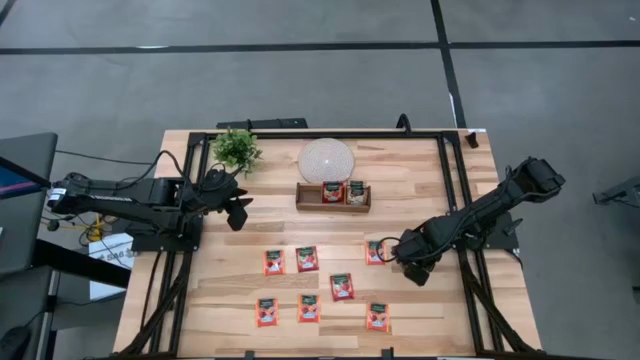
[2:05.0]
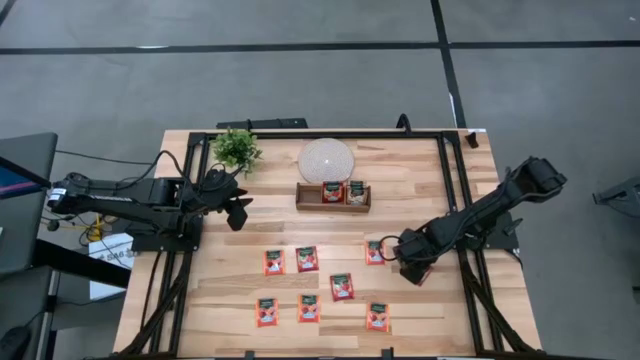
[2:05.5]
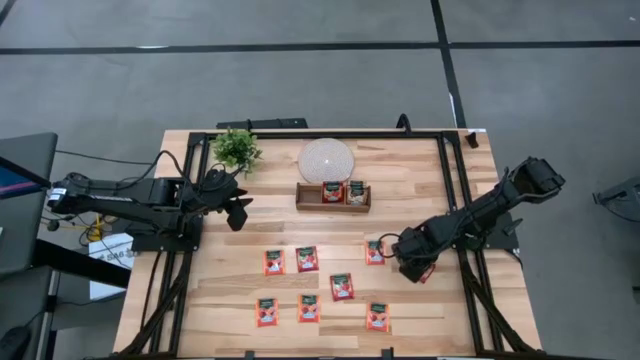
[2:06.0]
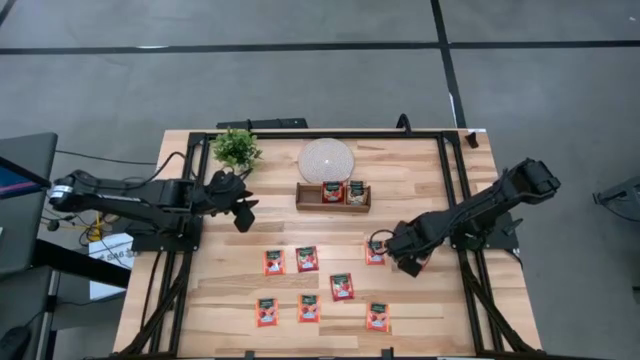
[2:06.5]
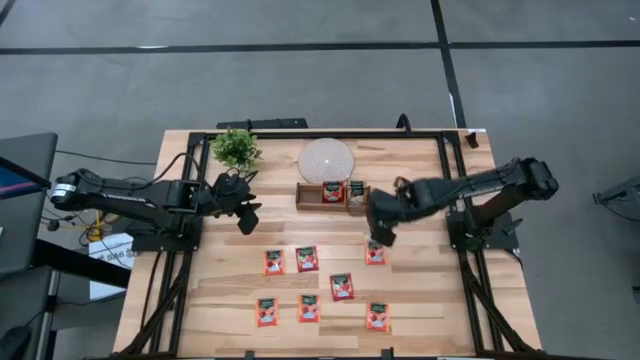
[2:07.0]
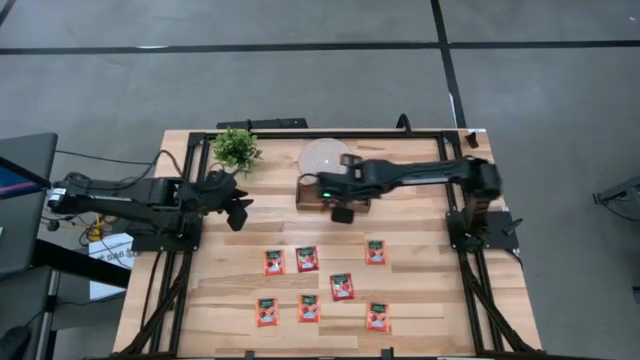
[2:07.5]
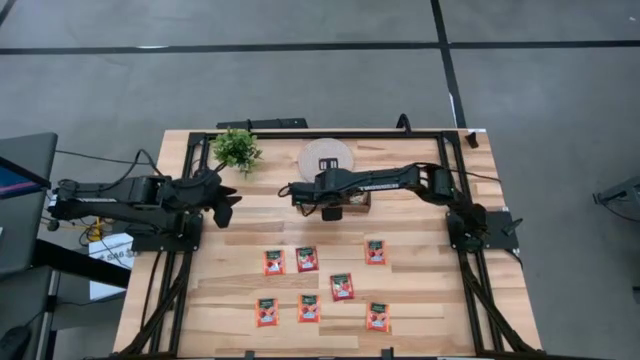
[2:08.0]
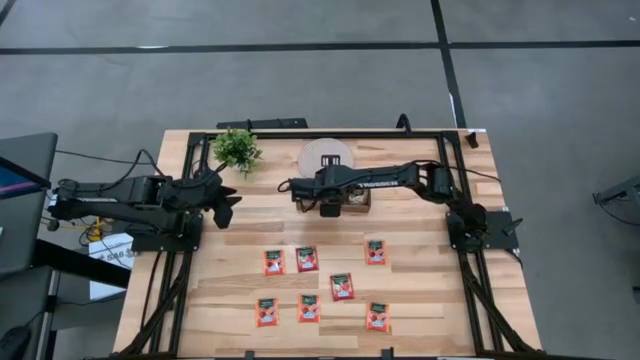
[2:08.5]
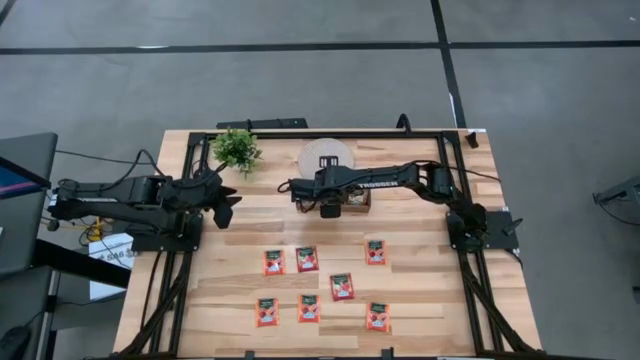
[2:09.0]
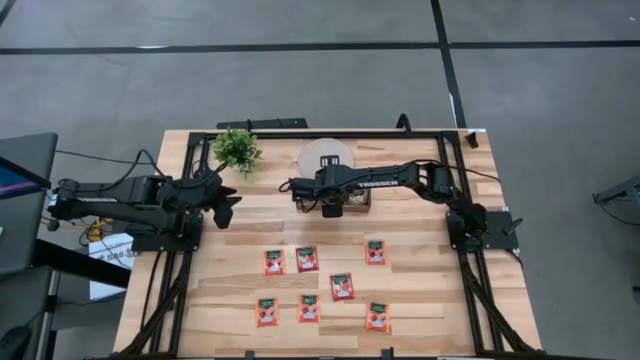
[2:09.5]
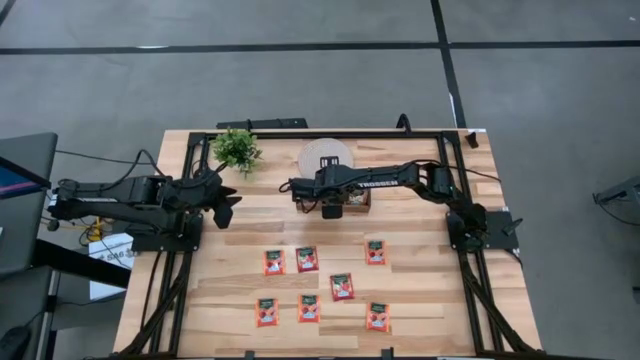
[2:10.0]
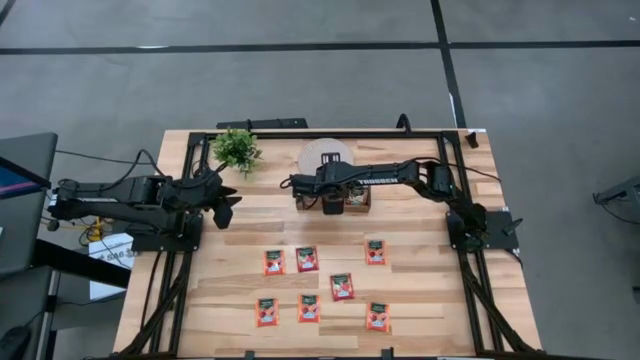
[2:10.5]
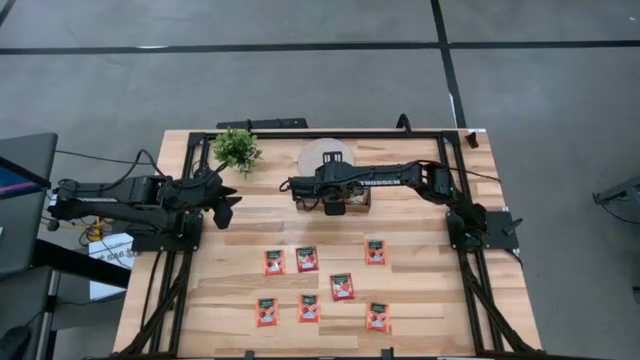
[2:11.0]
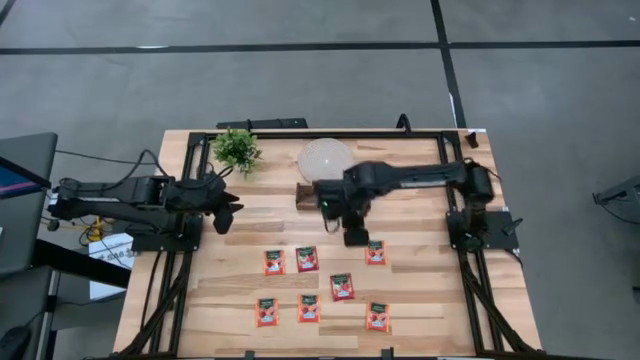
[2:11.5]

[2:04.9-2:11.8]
Task: Pick & Place Tea
Put the red tea bag into the middle section of the wooden organizer

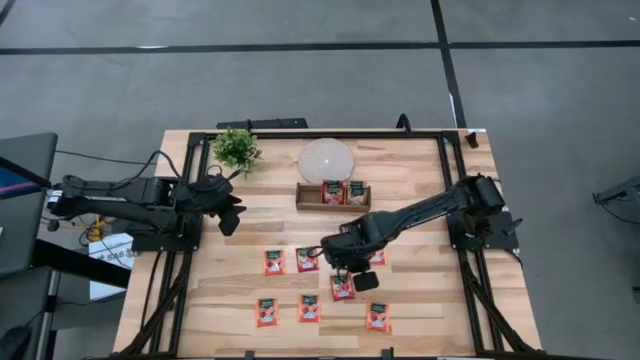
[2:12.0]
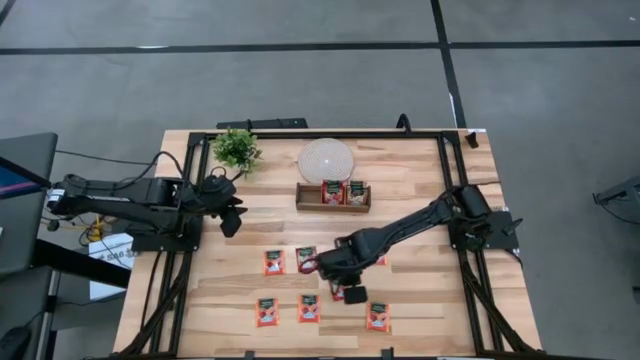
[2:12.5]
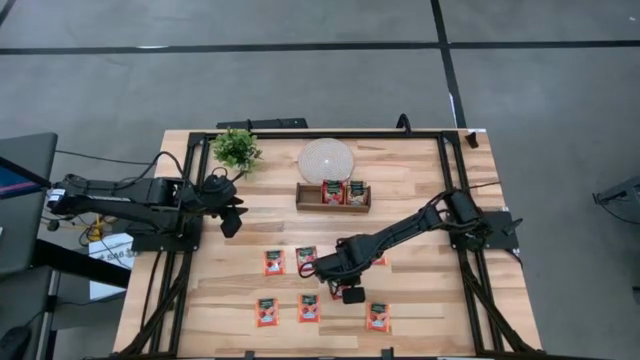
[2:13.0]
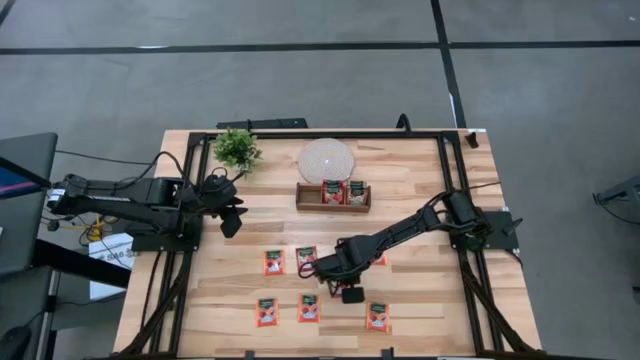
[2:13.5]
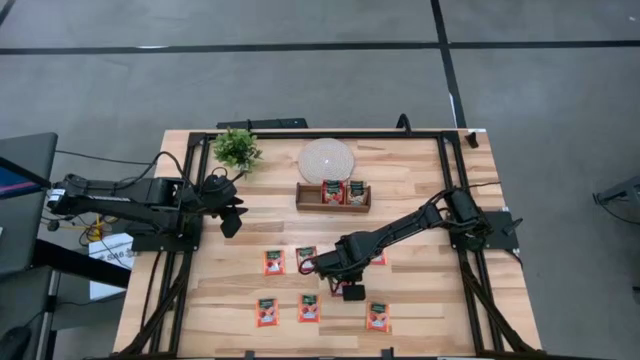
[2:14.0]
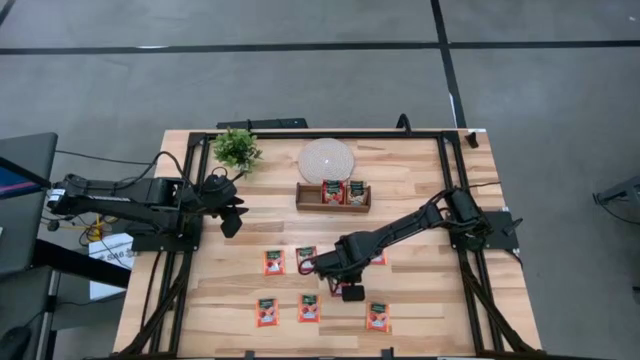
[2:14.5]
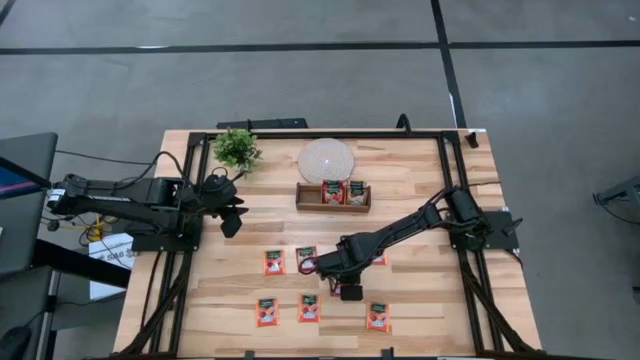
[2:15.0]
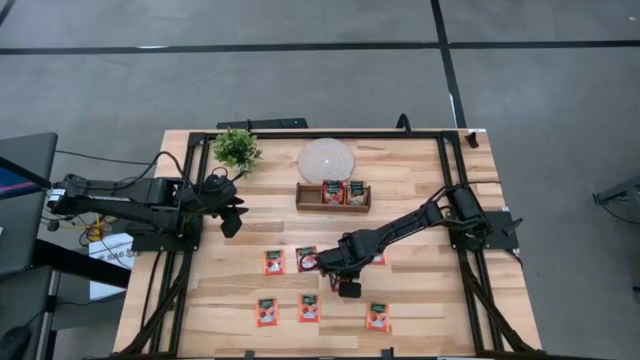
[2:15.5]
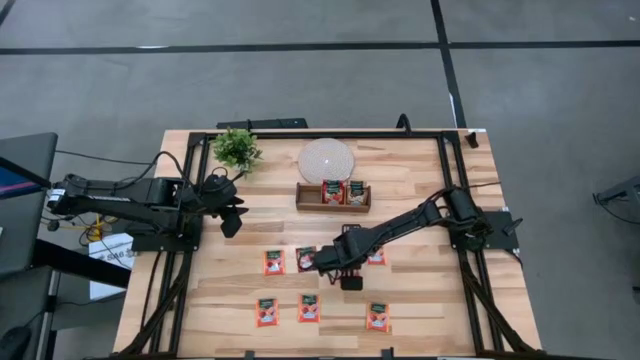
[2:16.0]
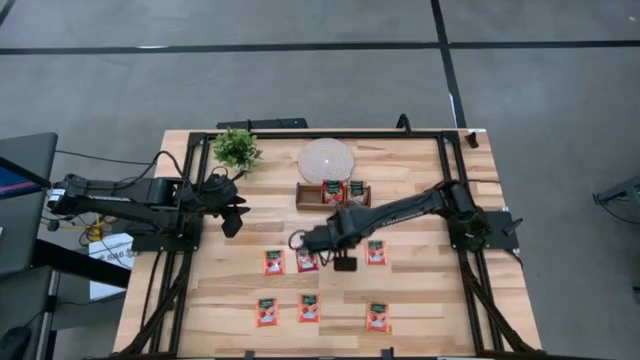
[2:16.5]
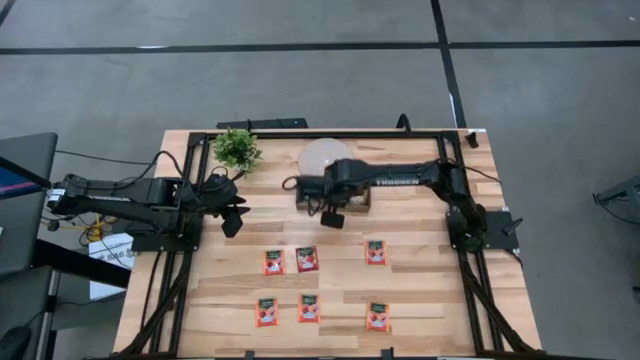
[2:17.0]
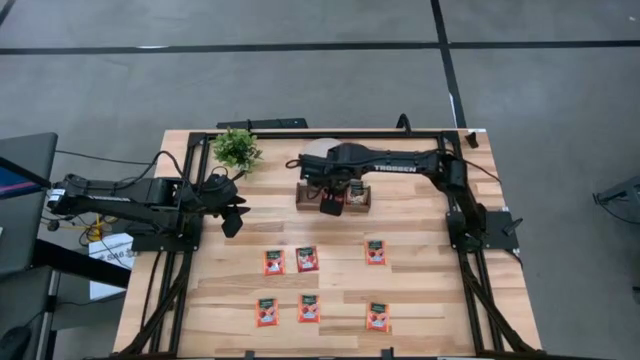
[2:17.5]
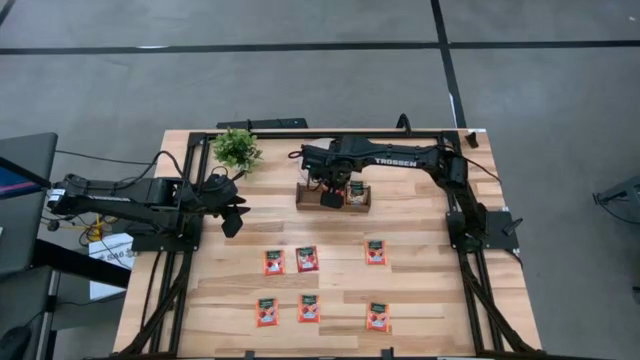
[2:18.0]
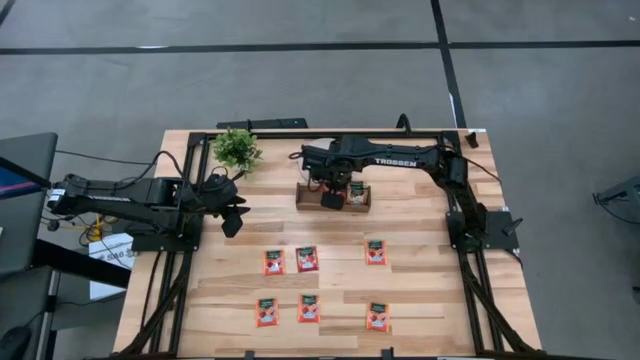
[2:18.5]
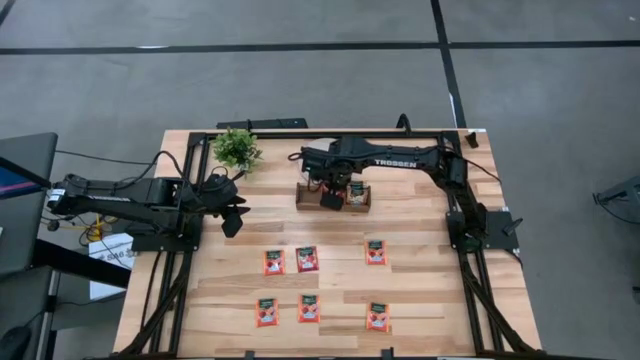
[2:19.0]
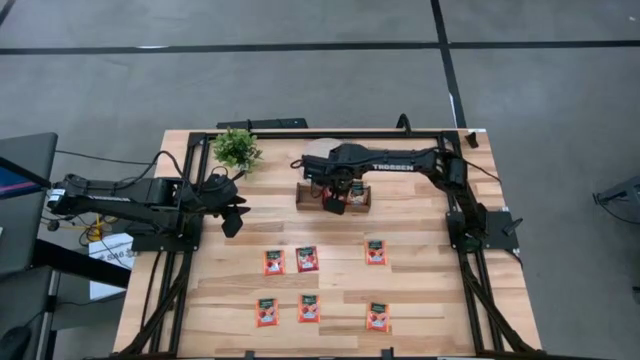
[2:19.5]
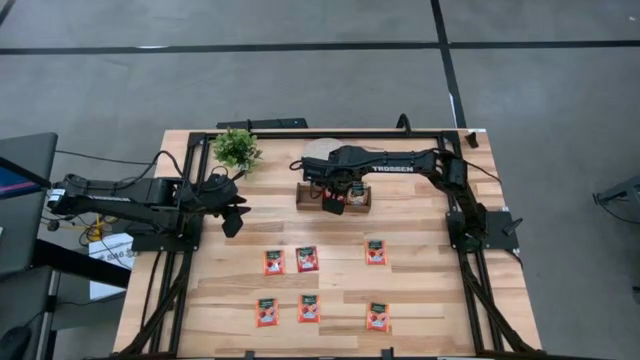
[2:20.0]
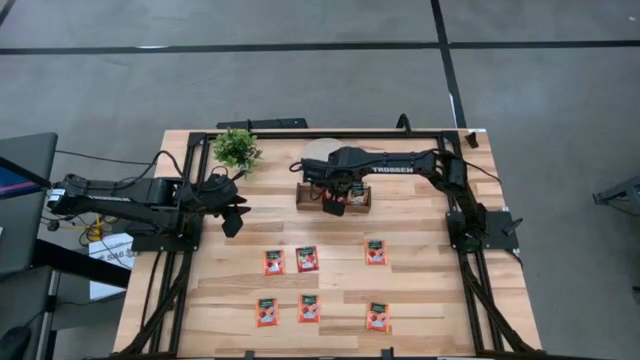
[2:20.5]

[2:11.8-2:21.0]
Put the red tea bag into the middle section of the wooden organizer

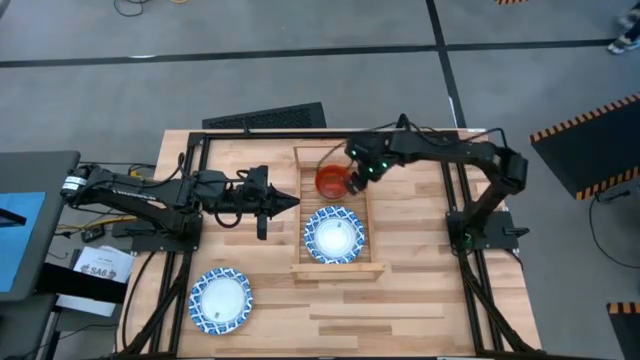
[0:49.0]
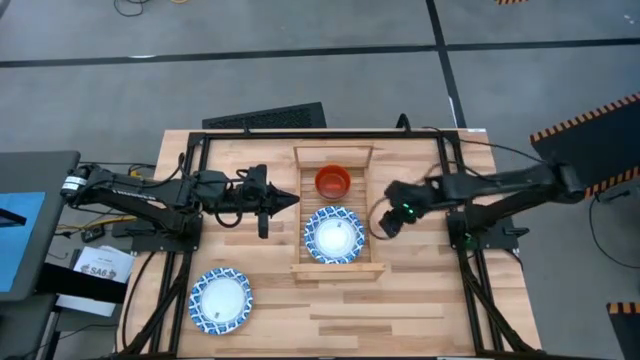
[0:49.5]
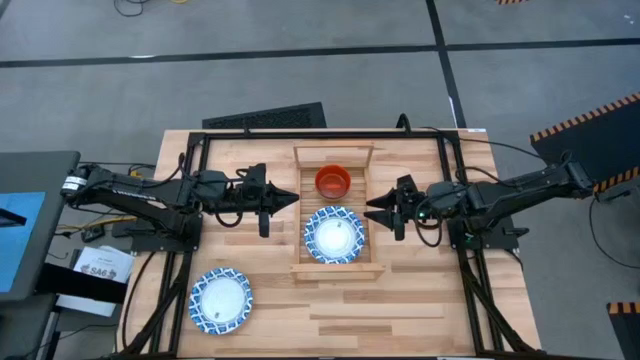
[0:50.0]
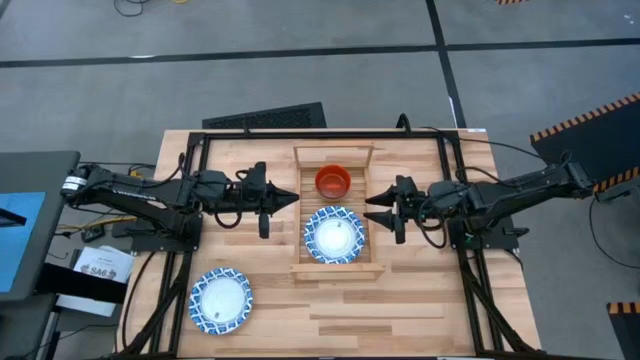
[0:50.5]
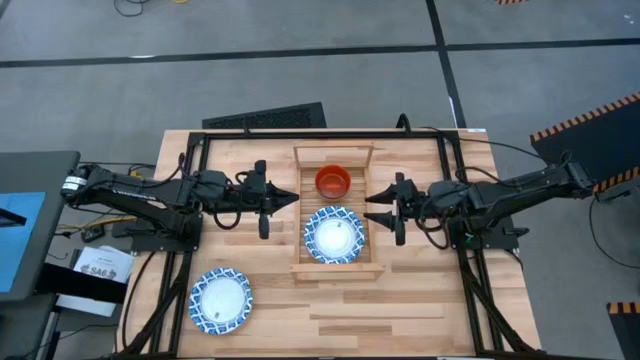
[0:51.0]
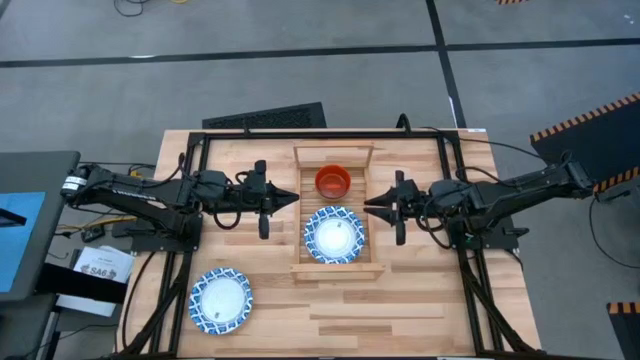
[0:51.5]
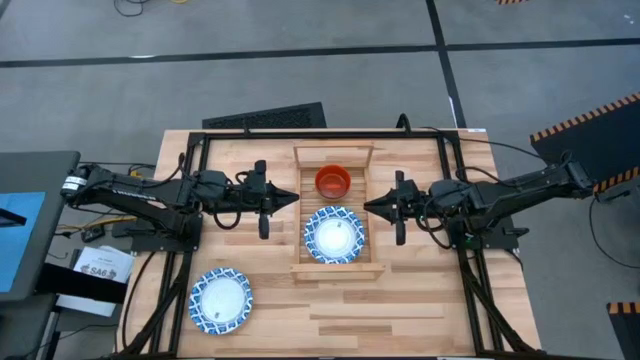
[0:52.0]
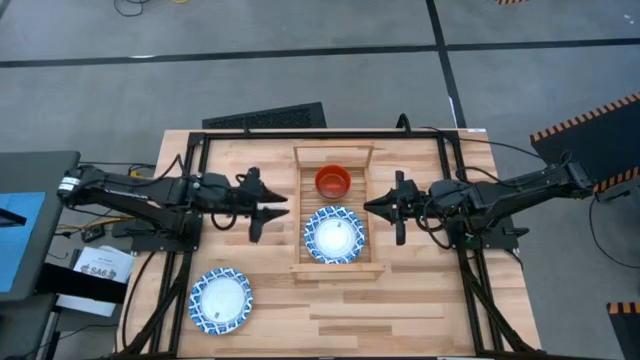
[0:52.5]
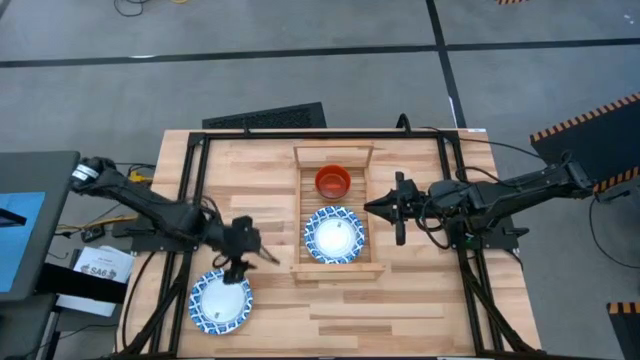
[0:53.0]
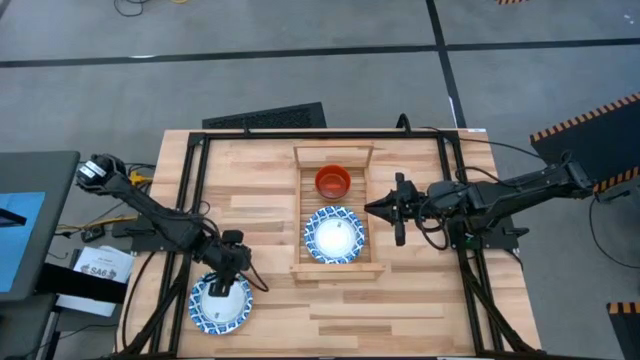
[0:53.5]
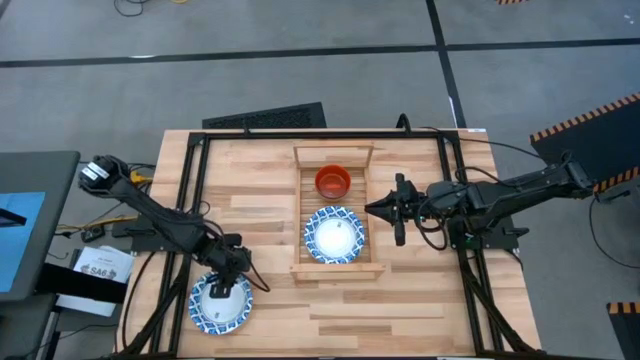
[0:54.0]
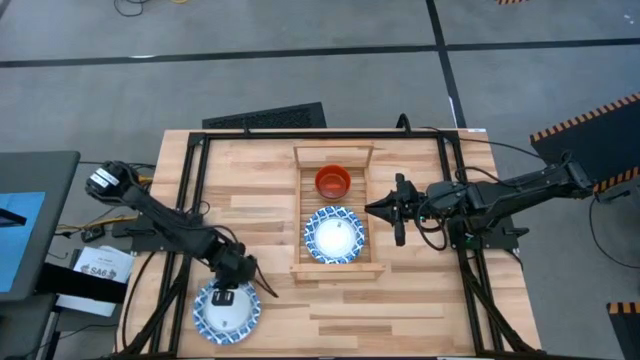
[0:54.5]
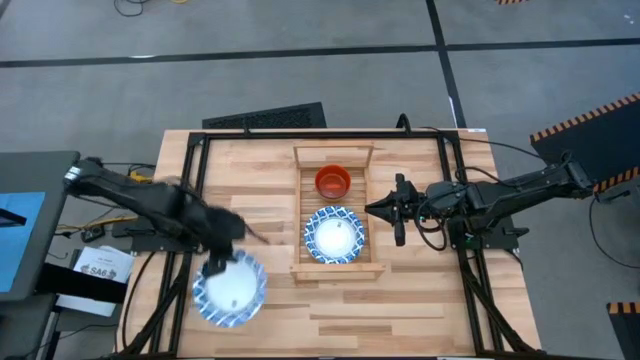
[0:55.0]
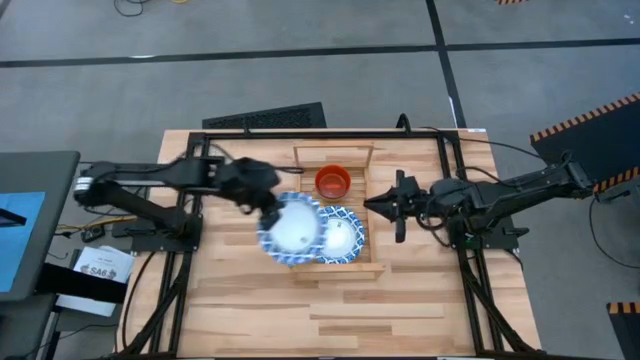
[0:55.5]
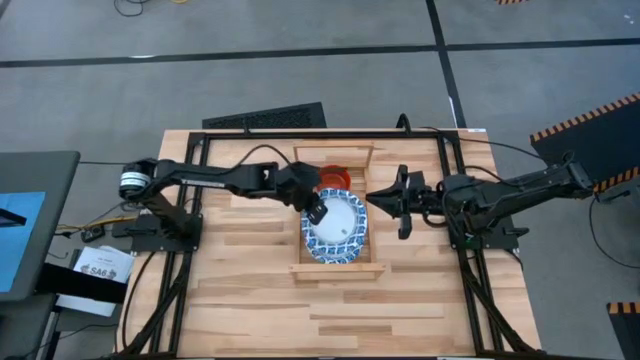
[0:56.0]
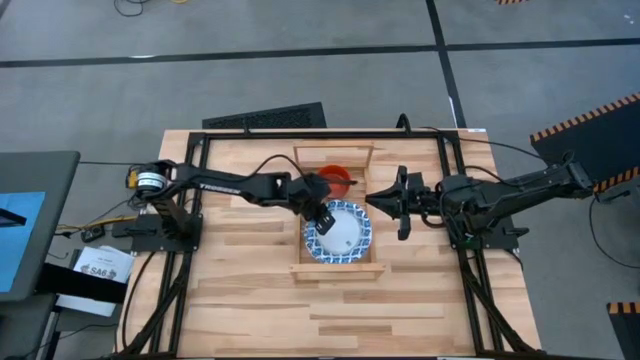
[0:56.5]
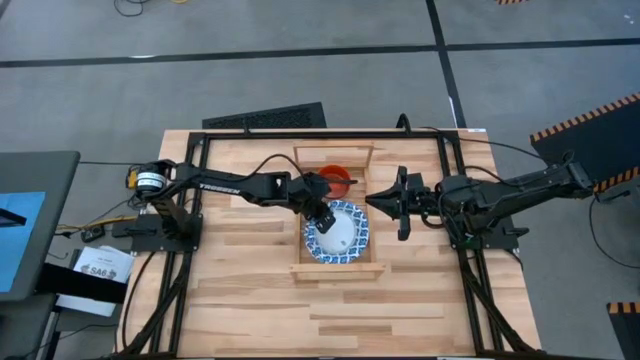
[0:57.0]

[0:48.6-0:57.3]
Task: Place and stack bowls onto a shelf
Stack the blue patterned bowl on top of the blue patterned bowl on the shelf
